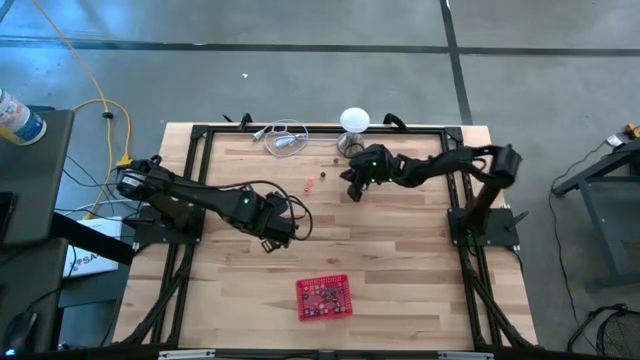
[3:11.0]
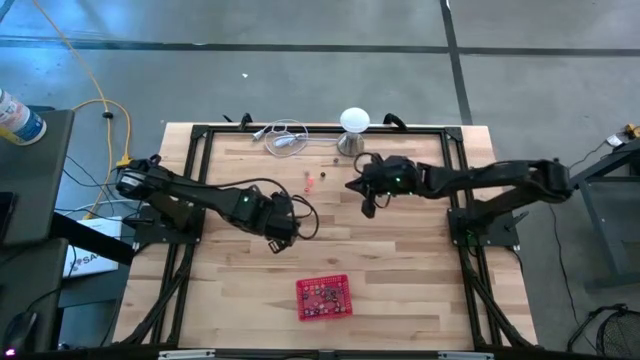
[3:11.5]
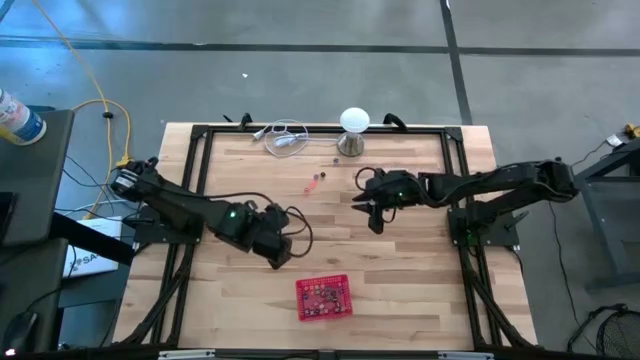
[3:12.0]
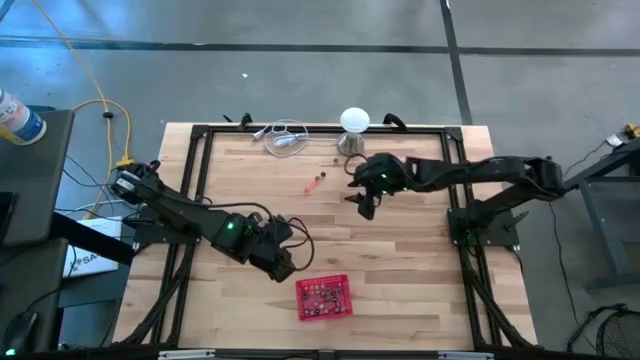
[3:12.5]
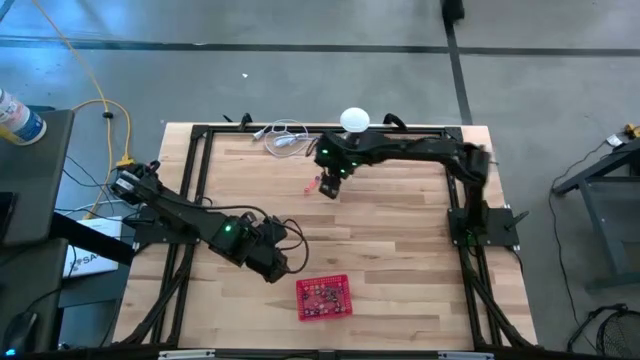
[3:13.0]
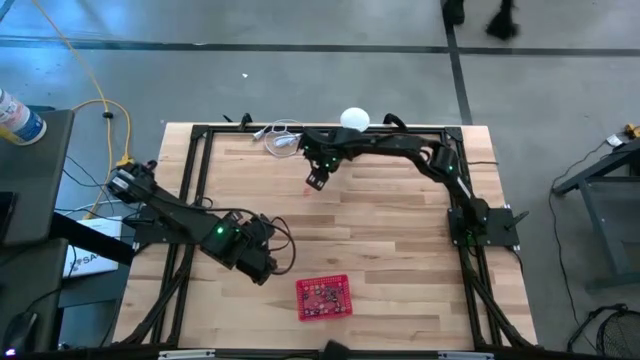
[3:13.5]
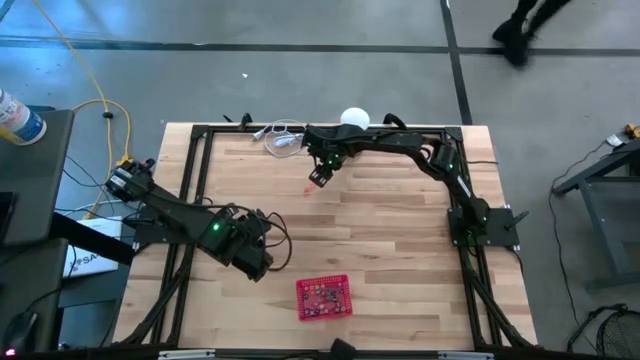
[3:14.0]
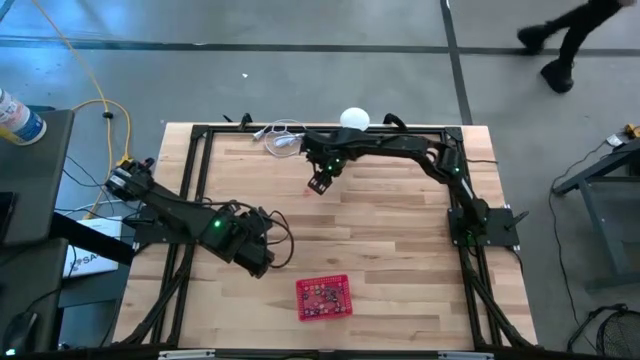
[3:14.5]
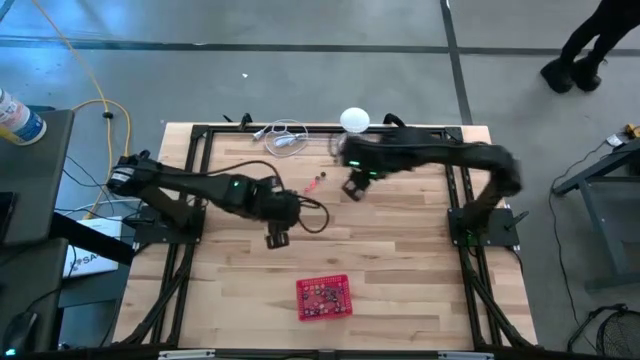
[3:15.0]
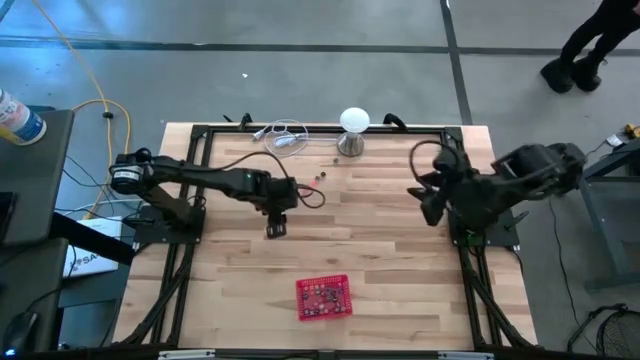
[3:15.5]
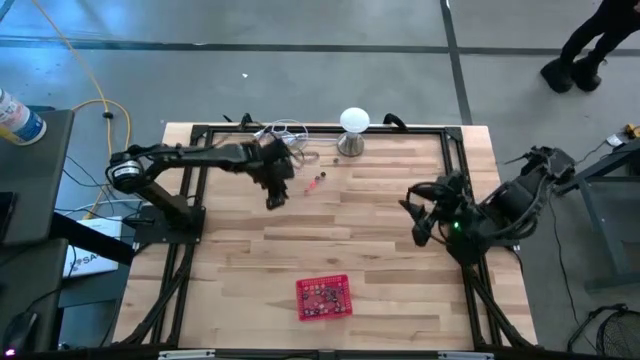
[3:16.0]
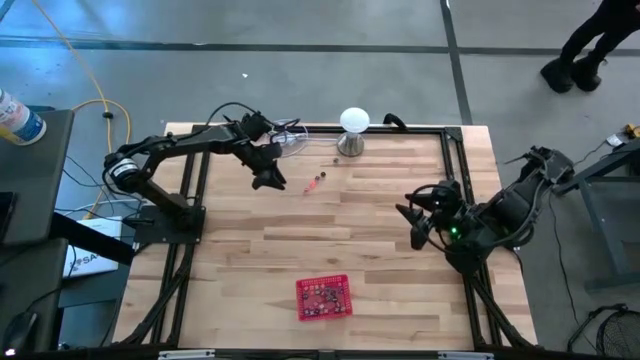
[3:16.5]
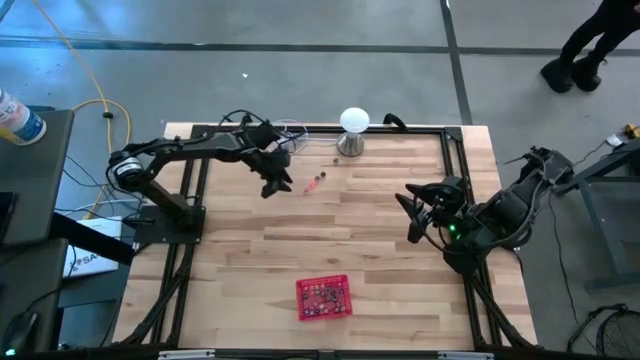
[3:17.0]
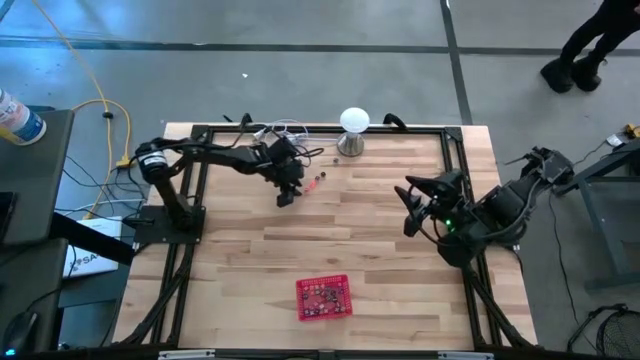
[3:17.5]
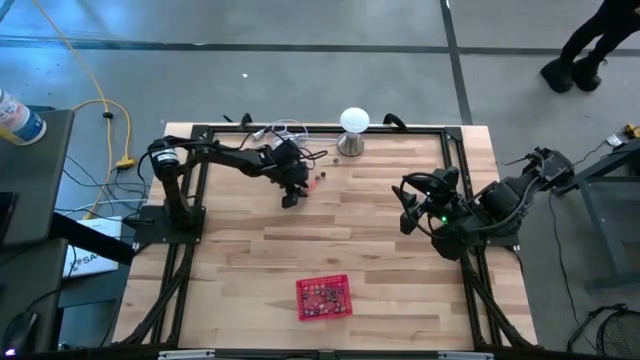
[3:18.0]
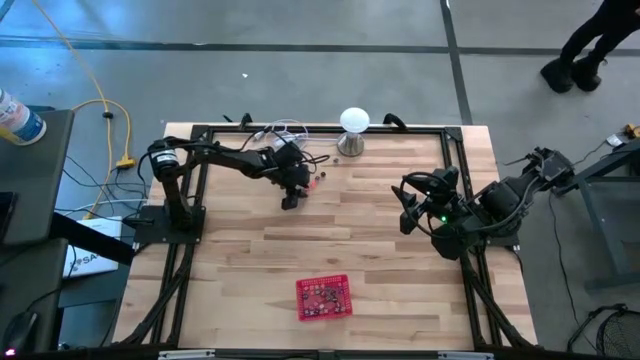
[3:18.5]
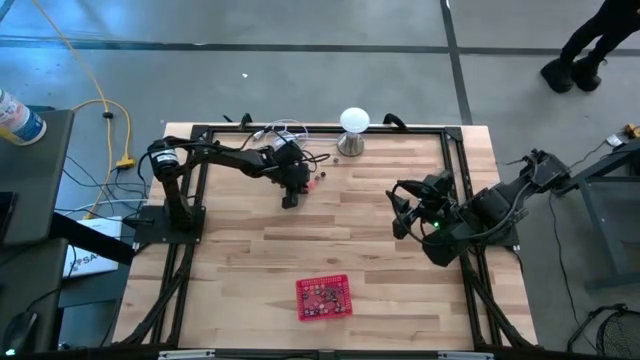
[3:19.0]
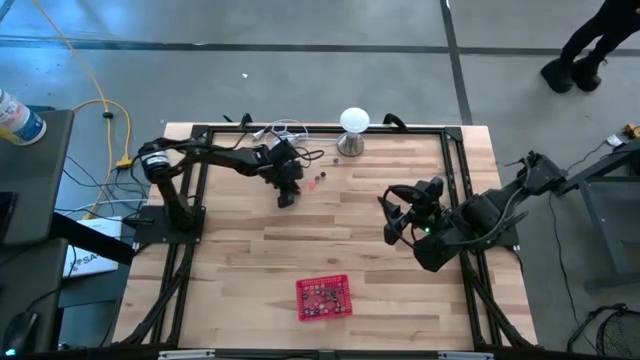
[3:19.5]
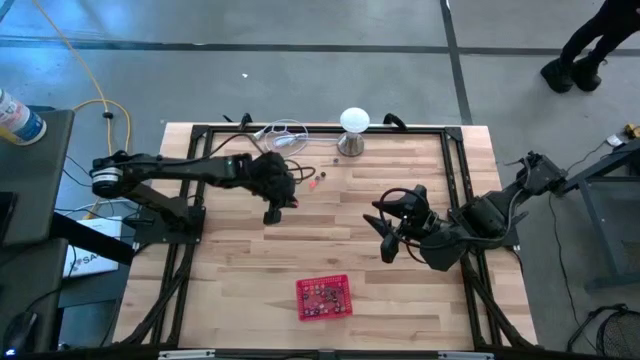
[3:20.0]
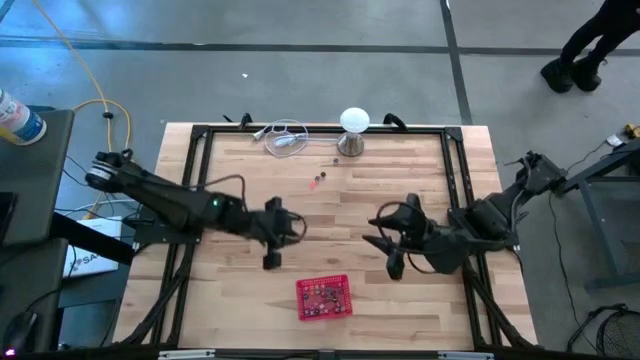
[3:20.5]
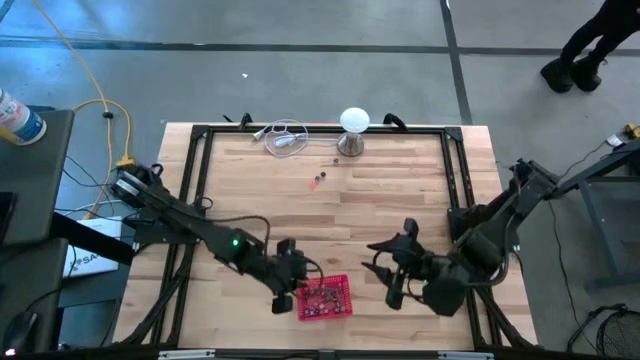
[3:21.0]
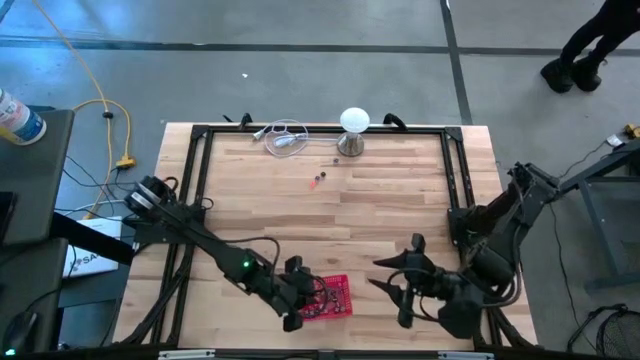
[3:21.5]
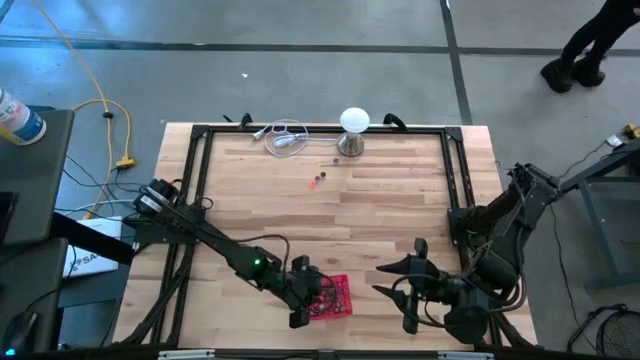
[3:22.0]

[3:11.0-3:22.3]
Task: Pick & Place Dice
Put the pink dice into the red bin

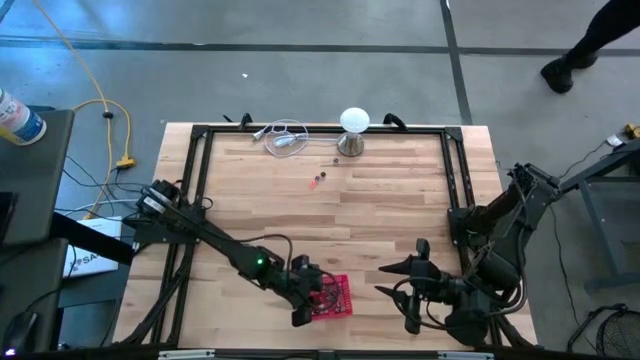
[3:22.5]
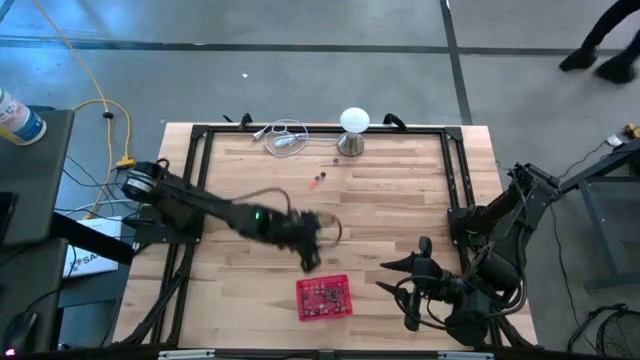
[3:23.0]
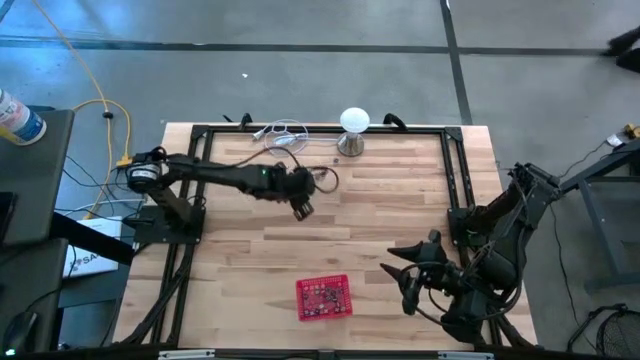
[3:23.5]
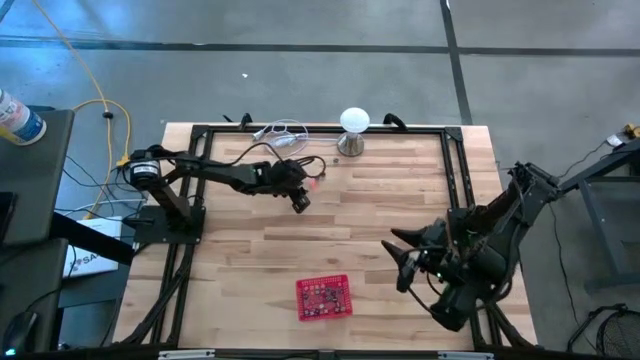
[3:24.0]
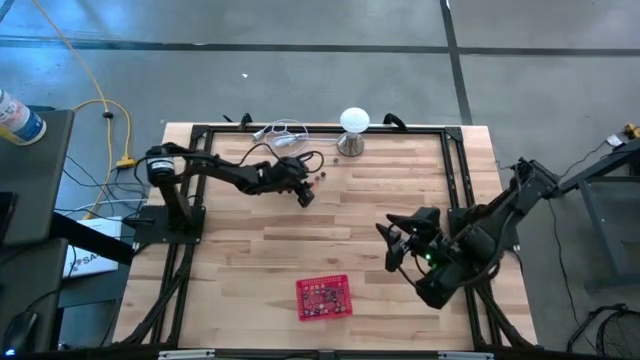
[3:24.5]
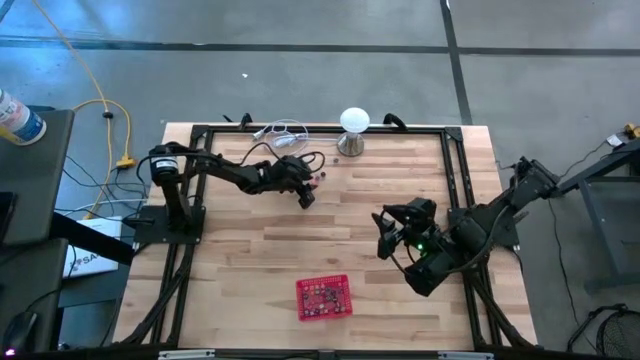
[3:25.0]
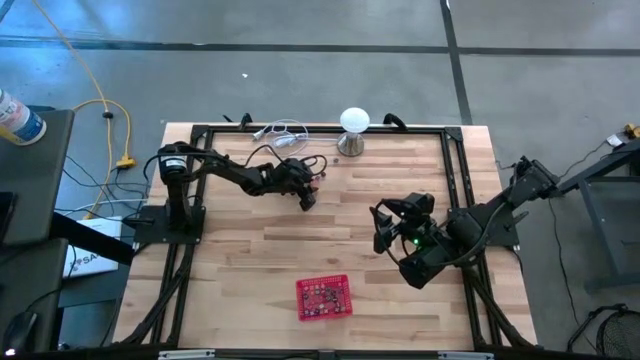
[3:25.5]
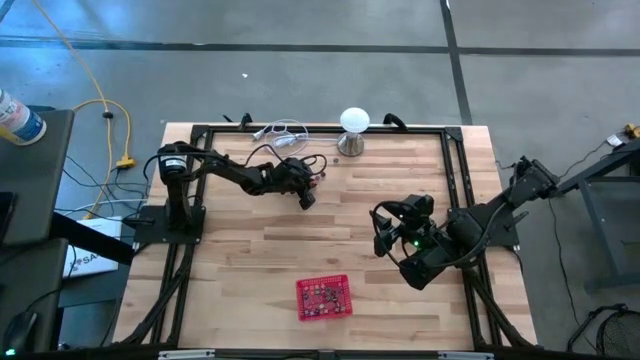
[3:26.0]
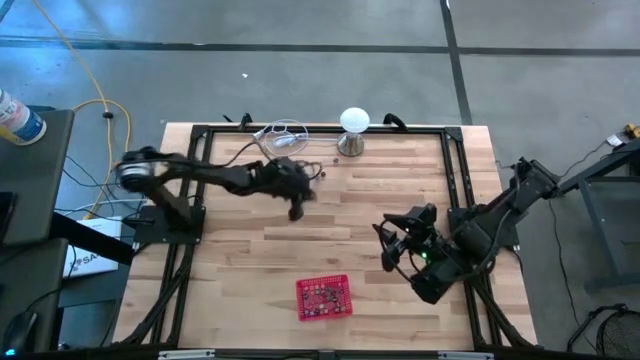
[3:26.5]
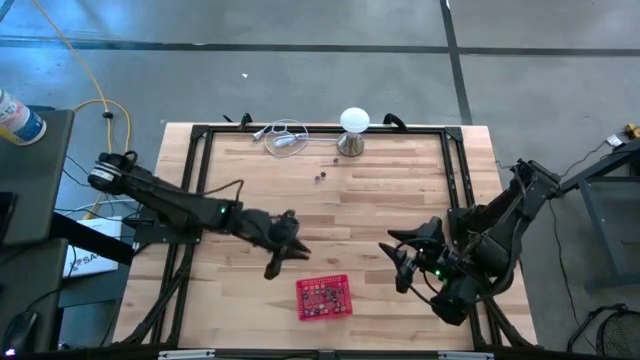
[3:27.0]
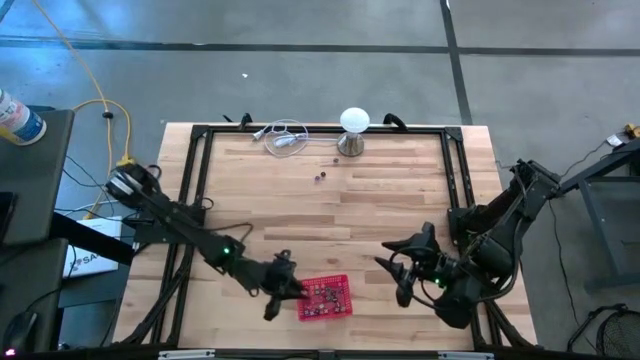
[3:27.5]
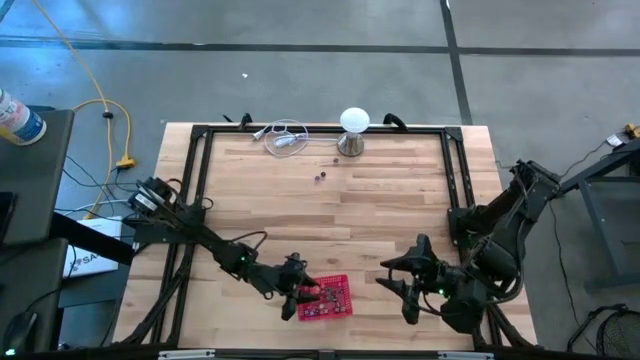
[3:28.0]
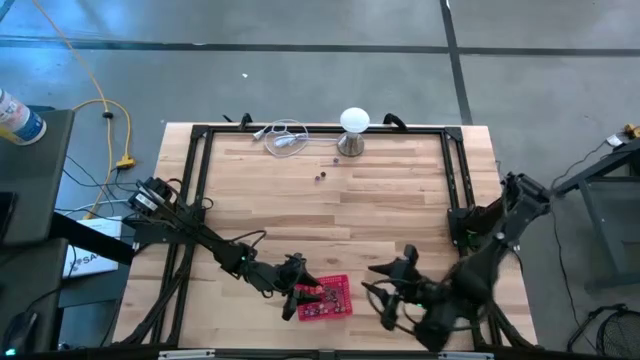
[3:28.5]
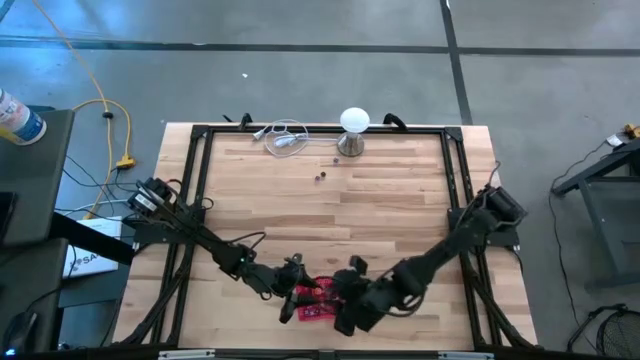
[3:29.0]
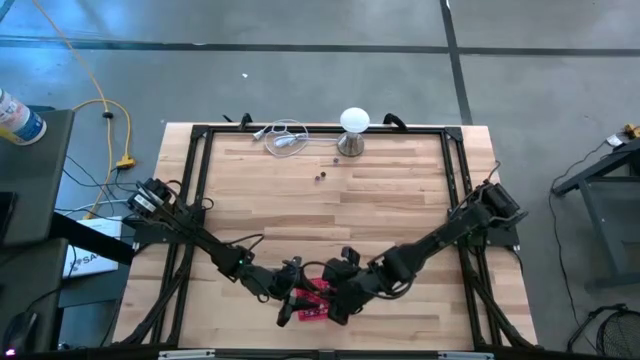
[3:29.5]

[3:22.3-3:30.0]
Put the orange dice into the red bin

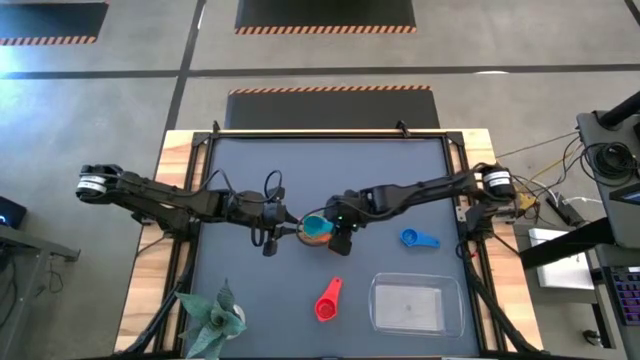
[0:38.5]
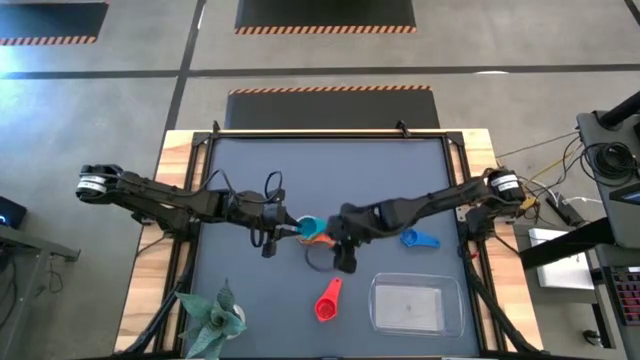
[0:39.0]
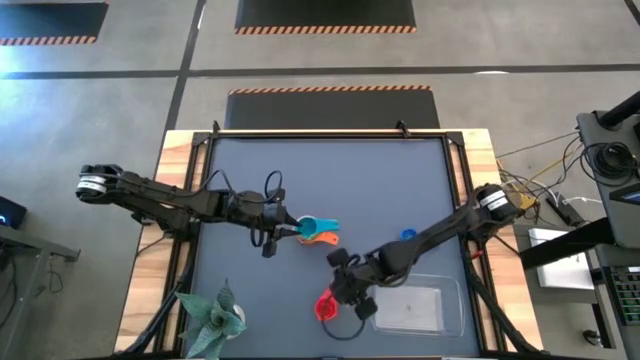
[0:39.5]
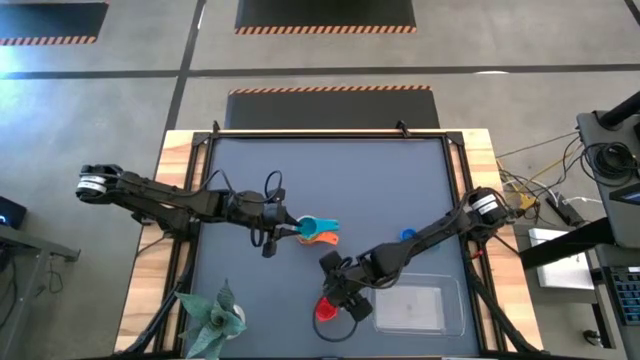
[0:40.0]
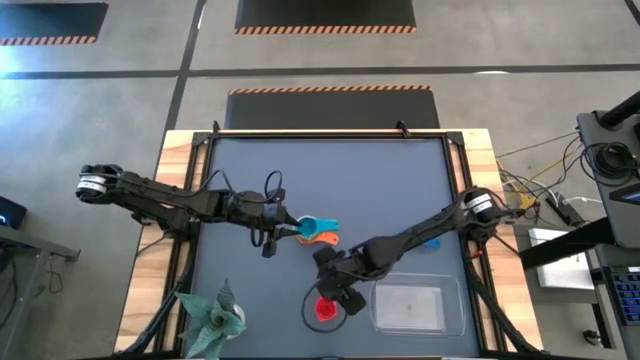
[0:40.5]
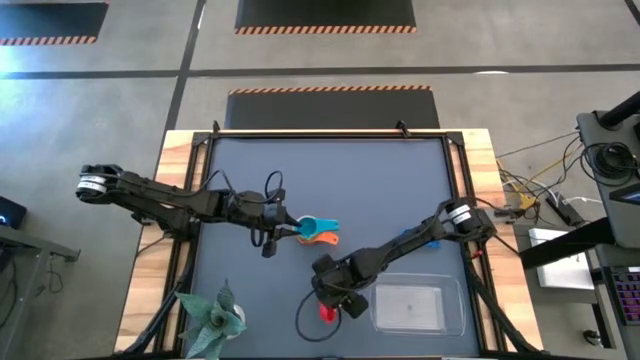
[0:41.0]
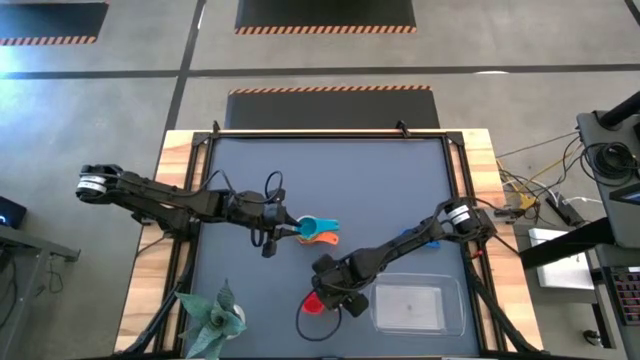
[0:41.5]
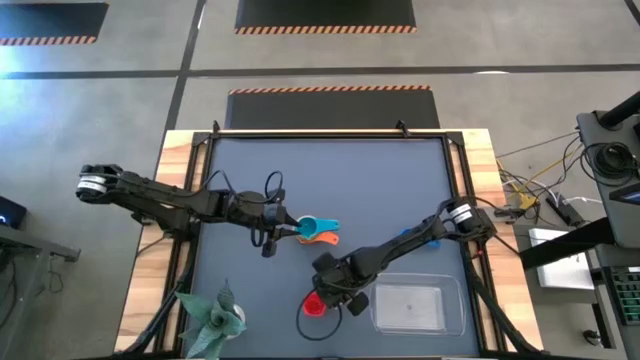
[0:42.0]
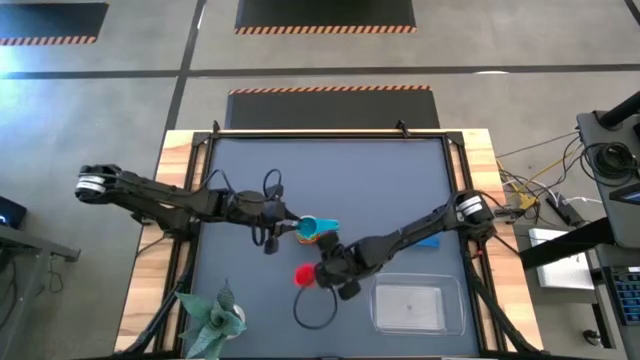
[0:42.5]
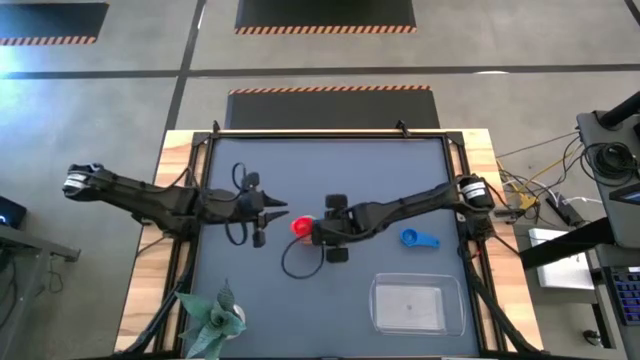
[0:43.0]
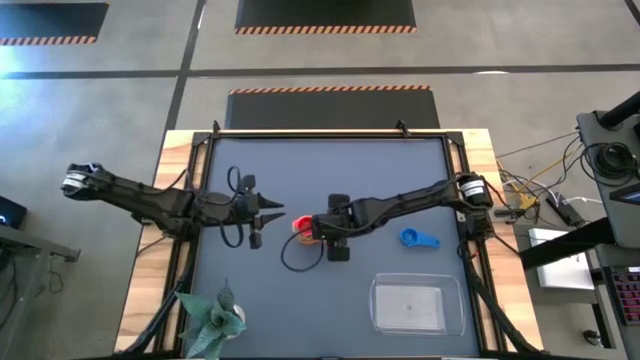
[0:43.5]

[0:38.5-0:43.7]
Task: Nest measuring cups in basket
Stack the red measuring cup on top of the light blue measuring cup
